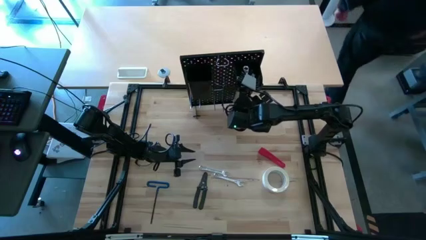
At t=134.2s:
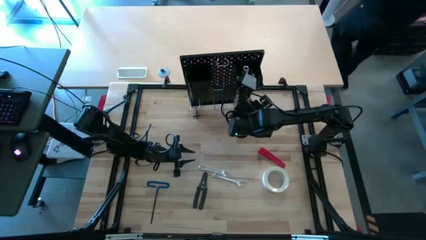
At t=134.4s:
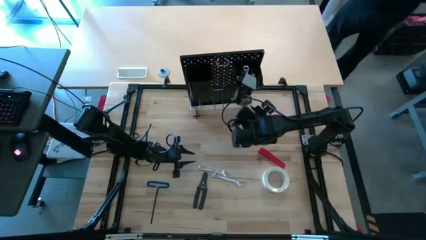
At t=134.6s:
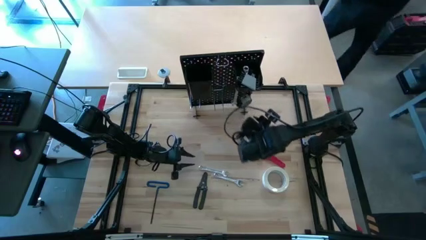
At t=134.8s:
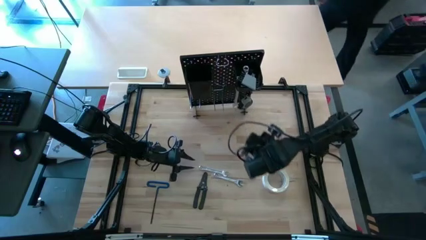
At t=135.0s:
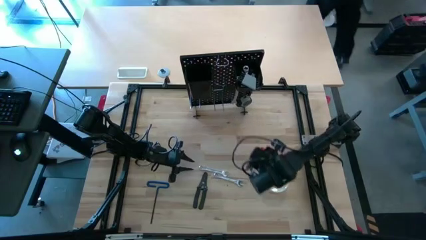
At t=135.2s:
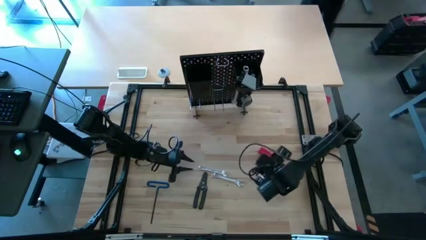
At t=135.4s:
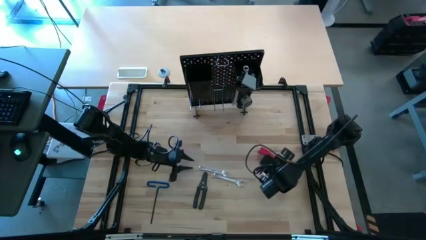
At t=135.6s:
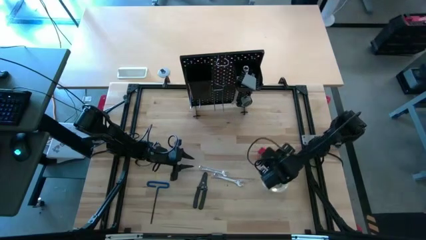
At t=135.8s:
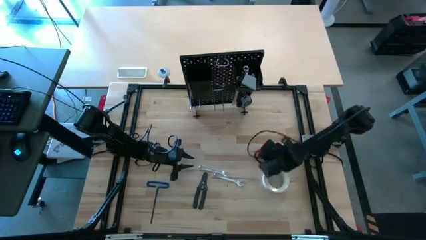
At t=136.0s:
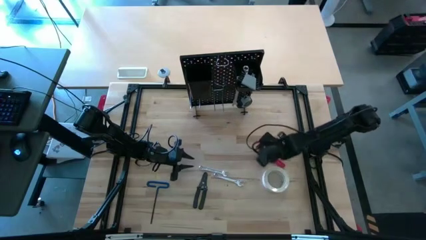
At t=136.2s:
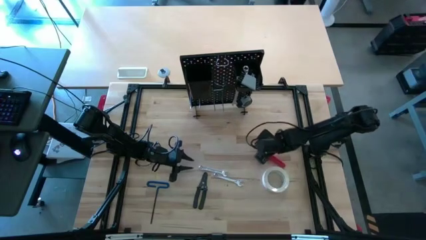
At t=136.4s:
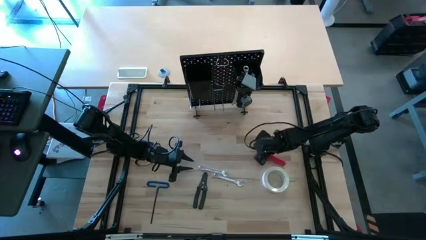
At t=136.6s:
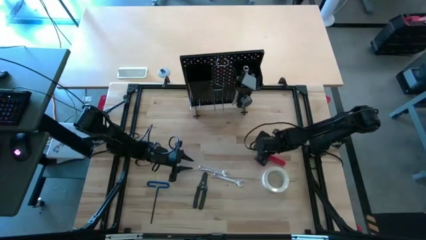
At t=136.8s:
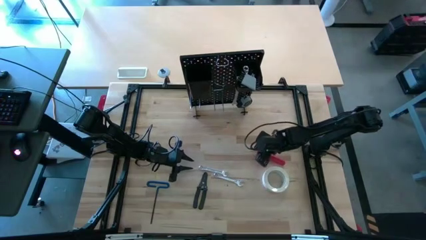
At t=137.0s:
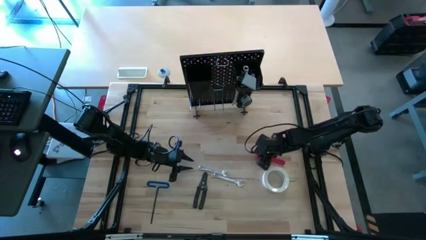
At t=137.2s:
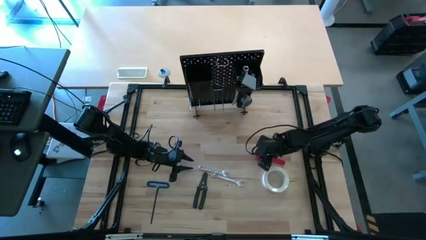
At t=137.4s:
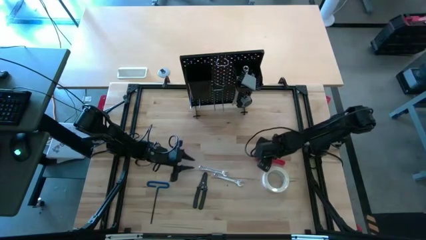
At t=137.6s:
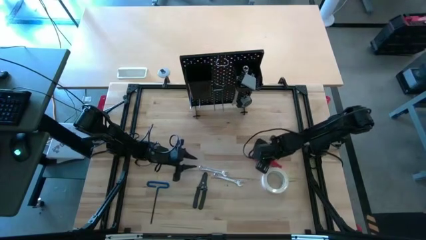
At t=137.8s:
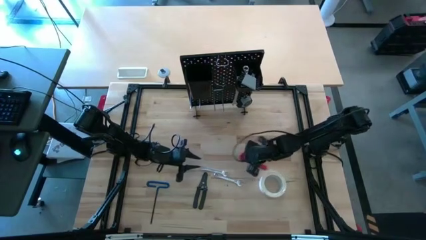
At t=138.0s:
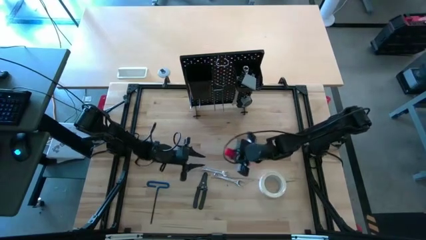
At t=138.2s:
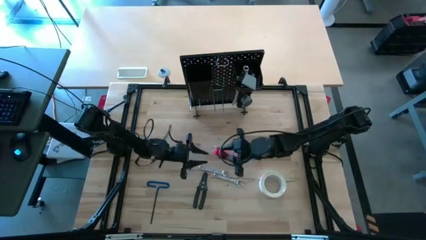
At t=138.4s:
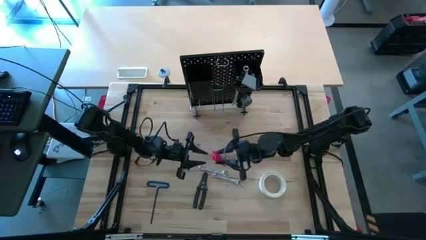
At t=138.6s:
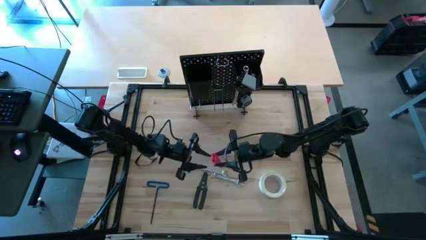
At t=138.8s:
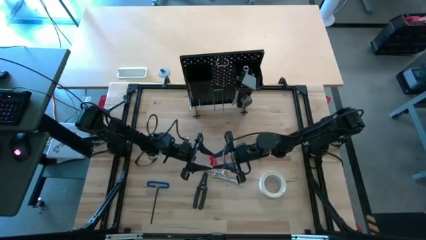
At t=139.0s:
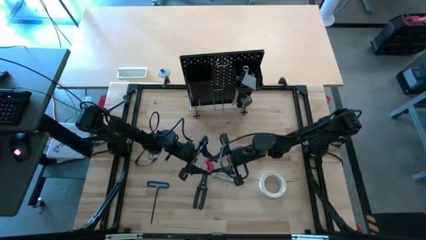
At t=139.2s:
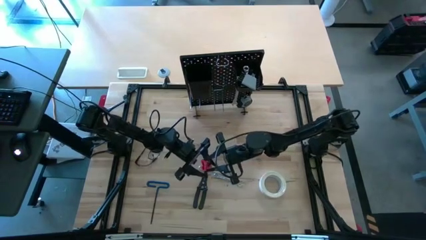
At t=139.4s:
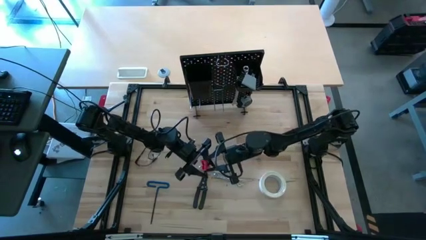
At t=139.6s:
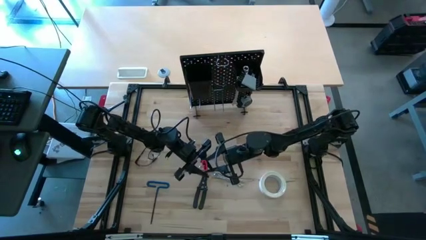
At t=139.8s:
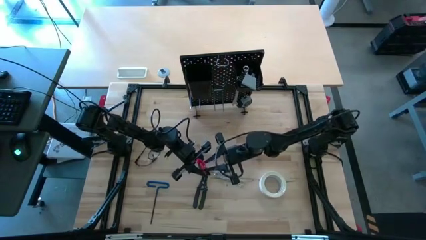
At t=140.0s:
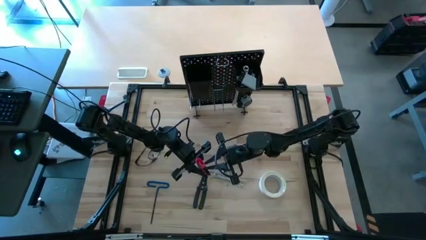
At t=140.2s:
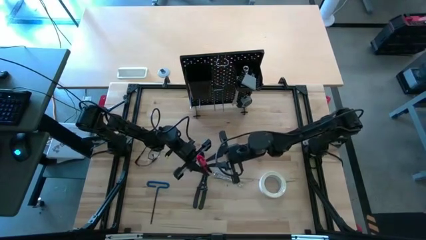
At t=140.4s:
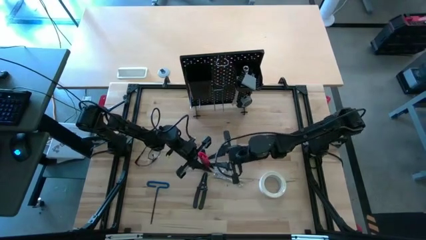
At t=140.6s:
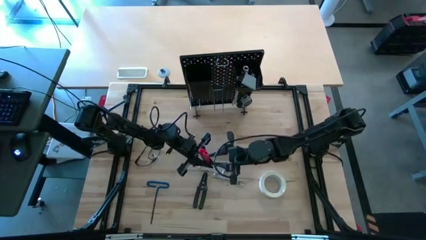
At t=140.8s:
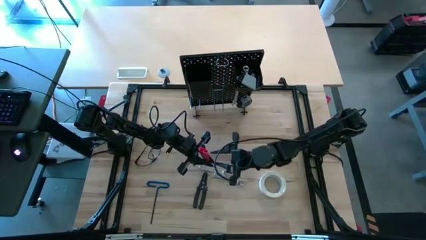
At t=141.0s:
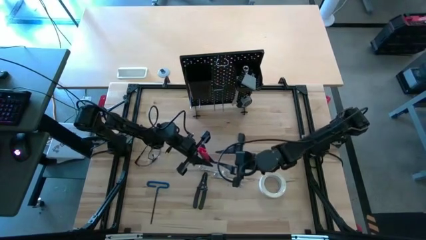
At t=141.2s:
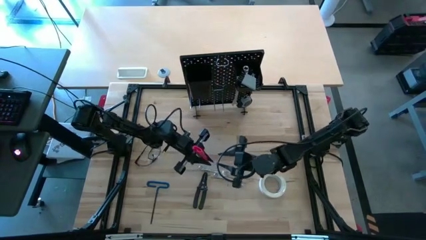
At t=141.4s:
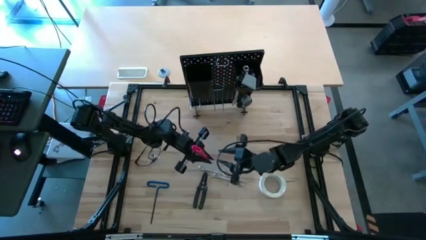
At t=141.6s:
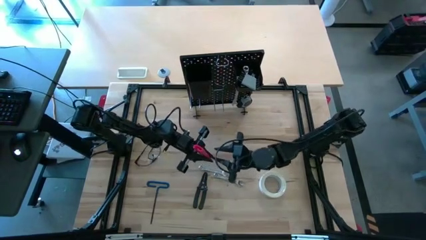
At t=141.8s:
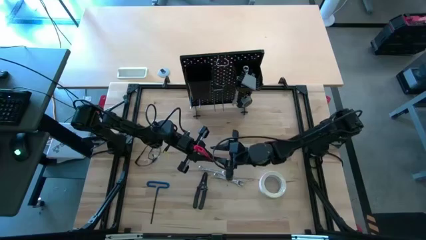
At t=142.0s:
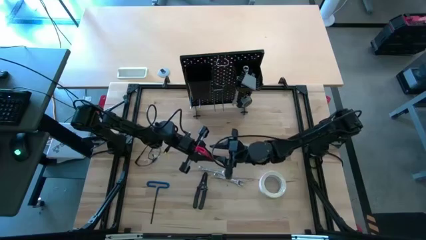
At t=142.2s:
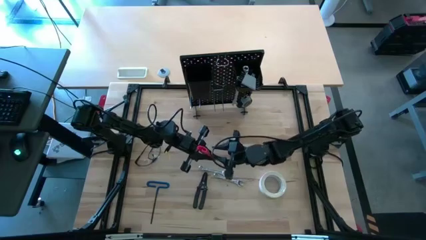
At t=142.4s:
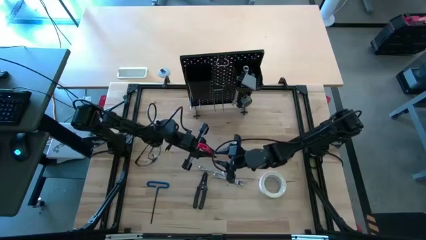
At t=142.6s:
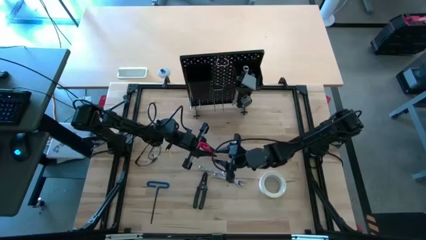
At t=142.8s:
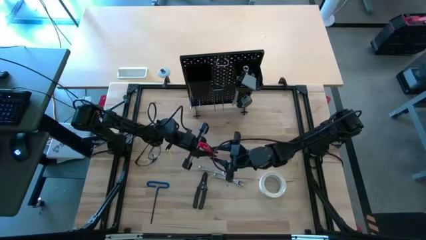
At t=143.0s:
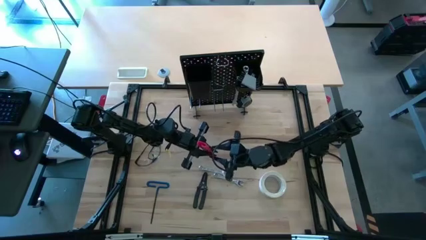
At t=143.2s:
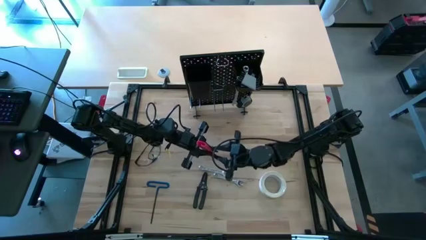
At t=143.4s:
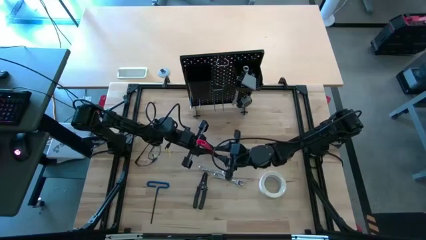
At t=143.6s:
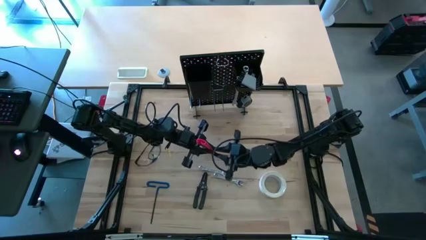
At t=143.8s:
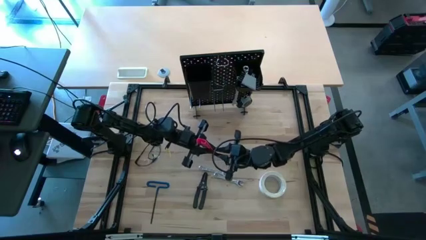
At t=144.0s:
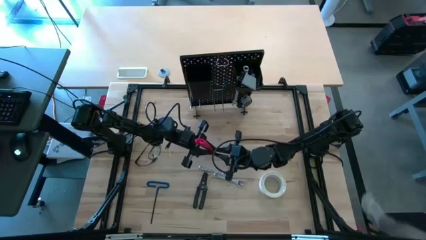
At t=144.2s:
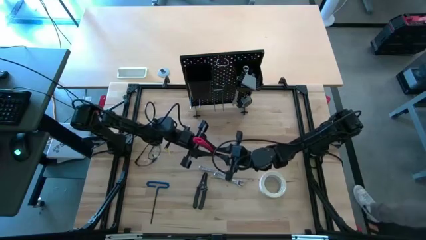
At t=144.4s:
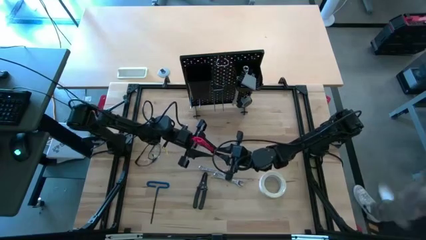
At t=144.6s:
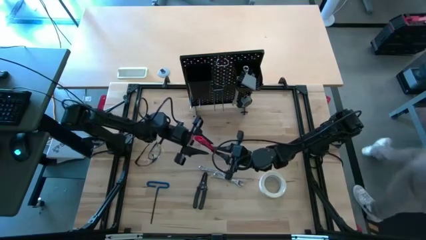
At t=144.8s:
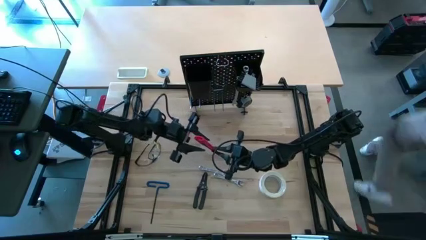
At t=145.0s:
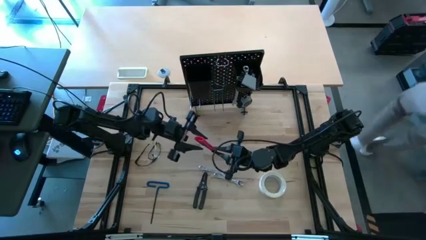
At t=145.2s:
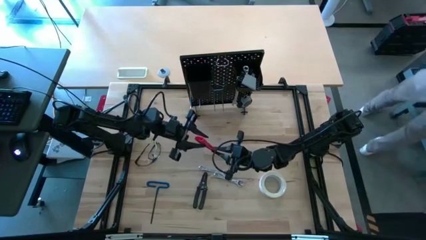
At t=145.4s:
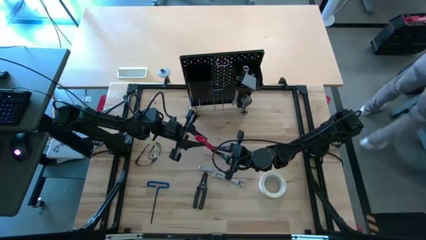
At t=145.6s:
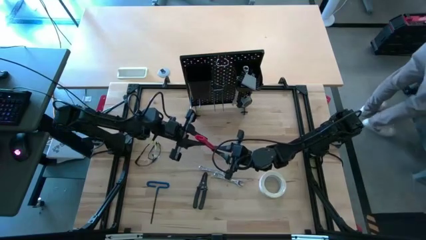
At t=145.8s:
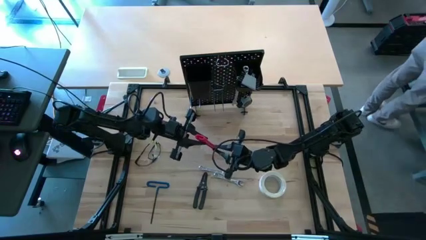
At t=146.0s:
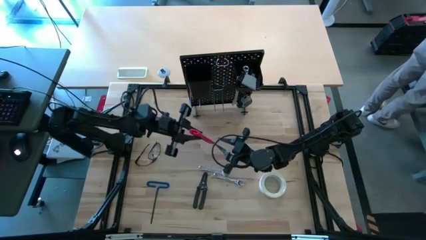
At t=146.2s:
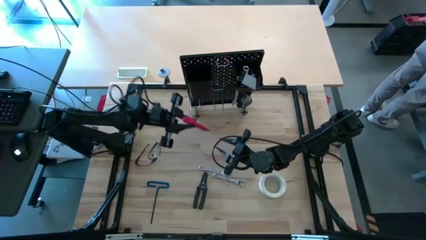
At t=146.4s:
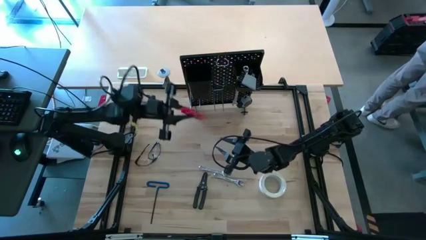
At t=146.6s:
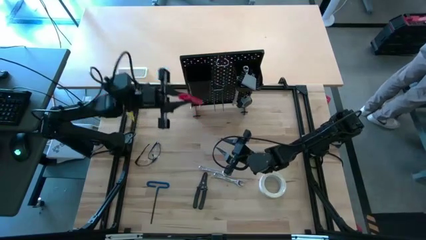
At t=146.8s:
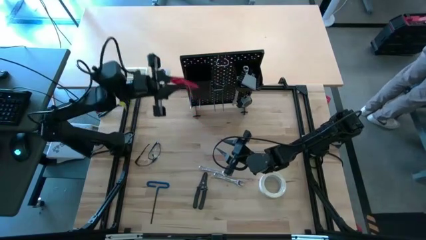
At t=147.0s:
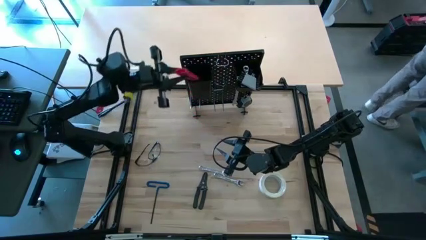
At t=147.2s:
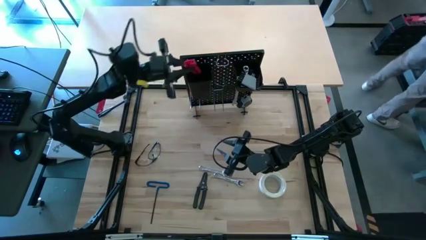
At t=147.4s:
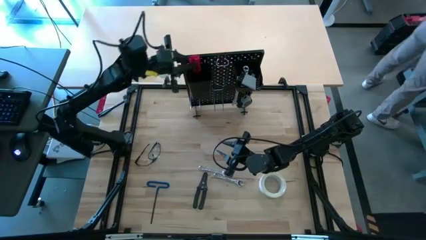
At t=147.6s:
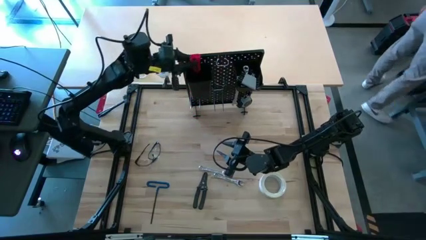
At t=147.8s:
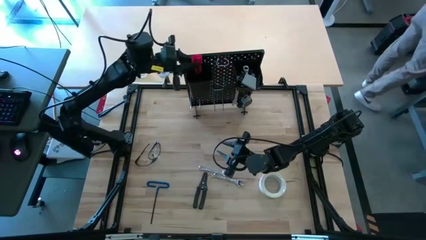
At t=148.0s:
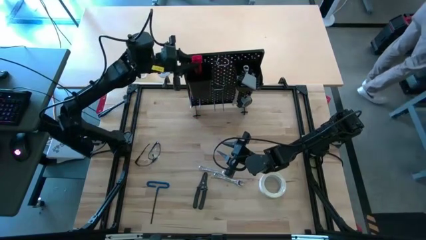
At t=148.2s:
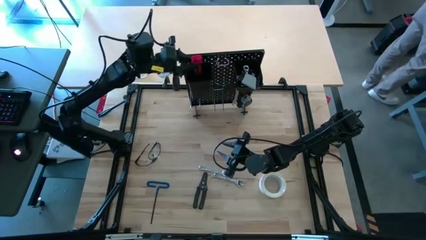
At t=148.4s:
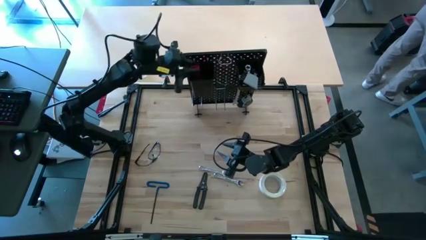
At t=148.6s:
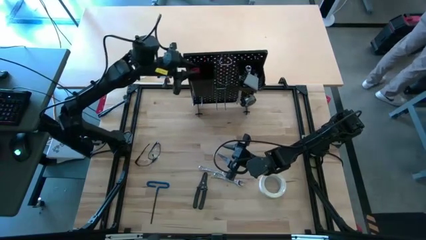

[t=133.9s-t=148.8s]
Task: Hang tools onto peg board
Put the red cutter into the black bin on the pegboard

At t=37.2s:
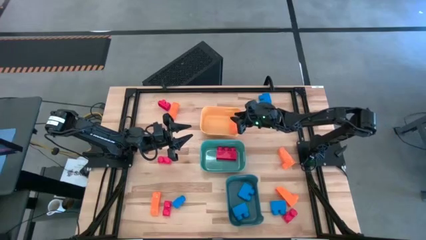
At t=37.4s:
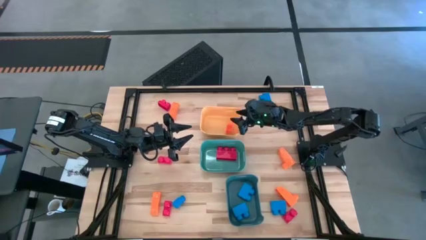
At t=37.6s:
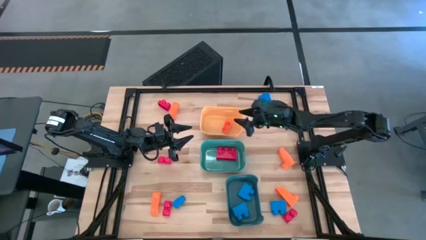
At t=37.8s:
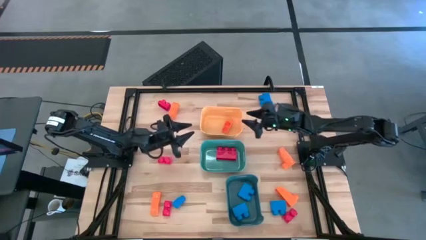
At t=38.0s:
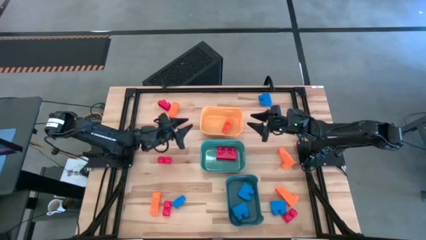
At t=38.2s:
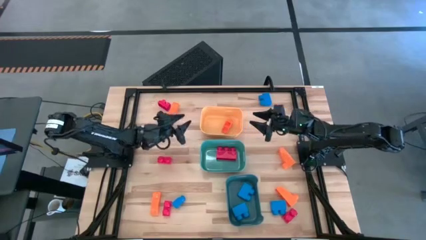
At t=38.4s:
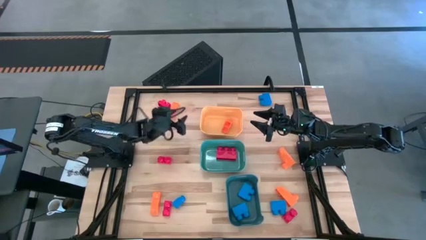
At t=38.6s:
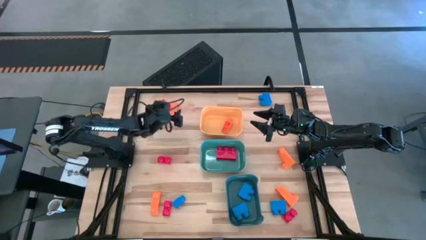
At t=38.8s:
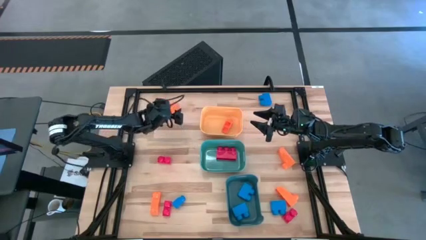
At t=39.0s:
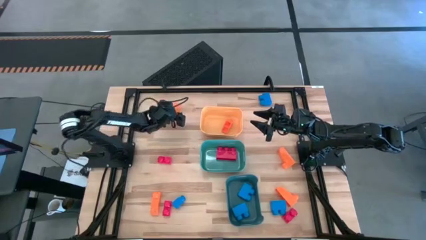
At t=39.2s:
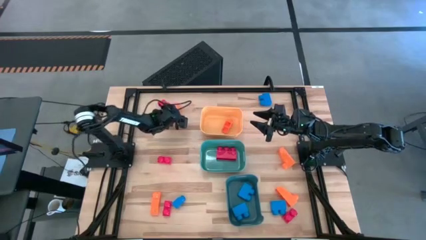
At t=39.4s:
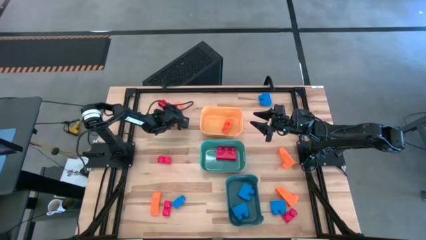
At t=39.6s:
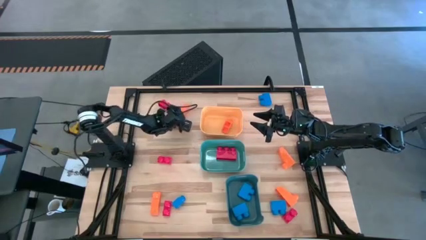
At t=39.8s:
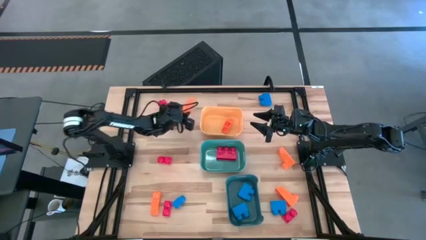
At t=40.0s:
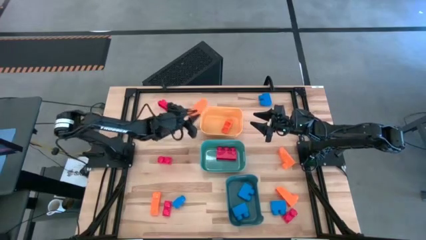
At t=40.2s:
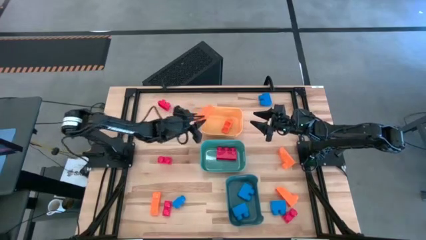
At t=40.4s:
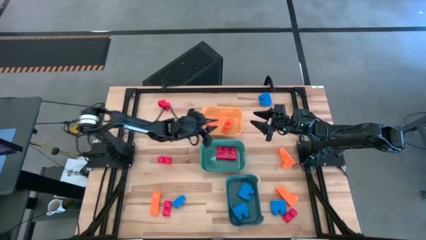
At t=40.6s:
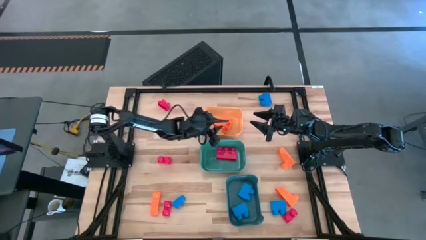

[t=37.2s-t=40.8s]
Task: Sort & place blocks by color
Put the orange game piece into the orange bin
